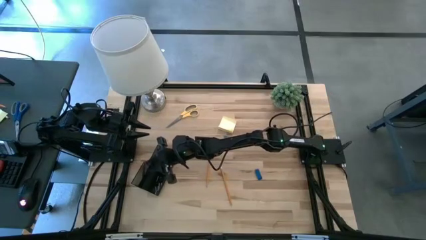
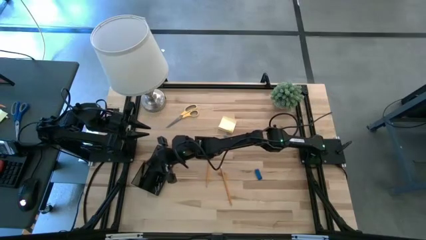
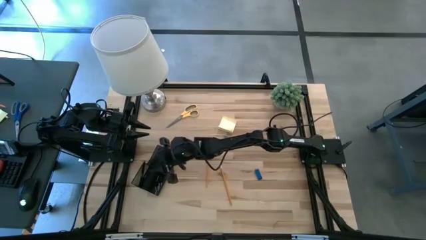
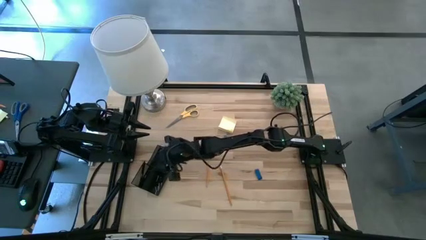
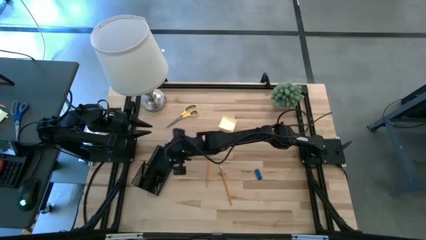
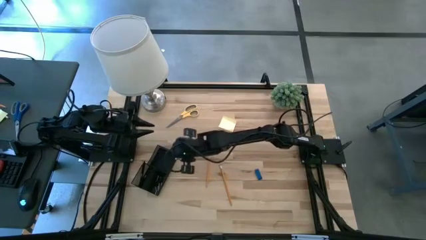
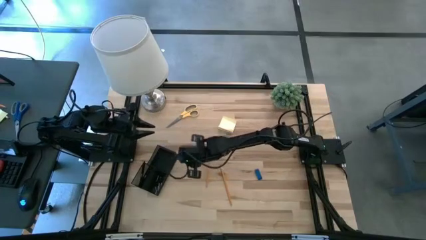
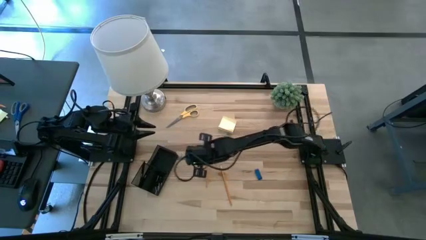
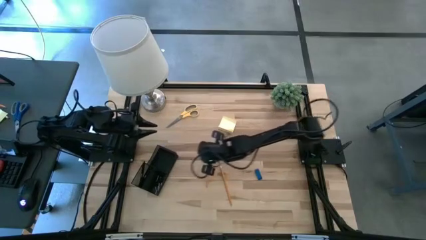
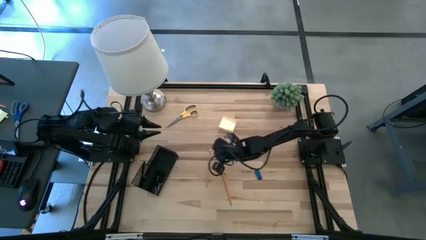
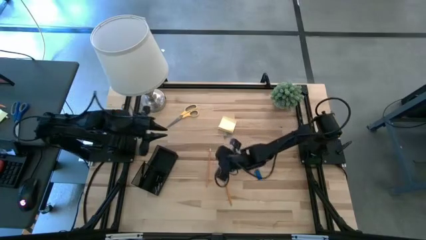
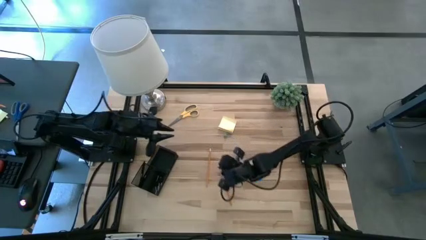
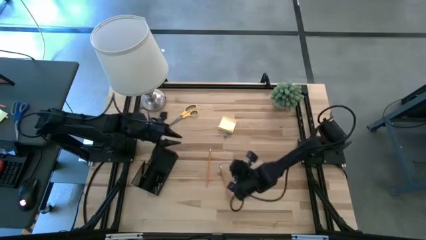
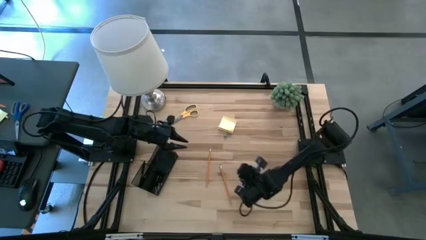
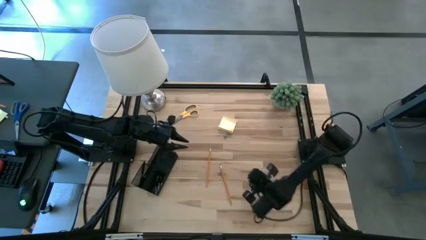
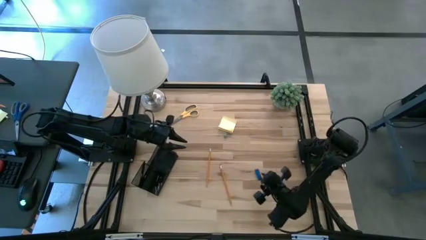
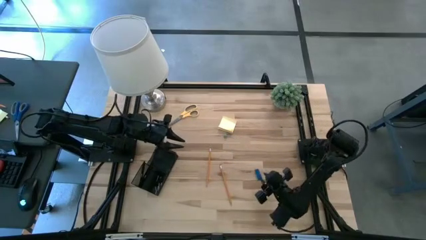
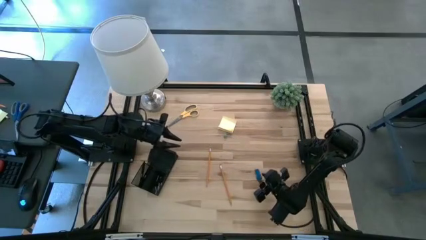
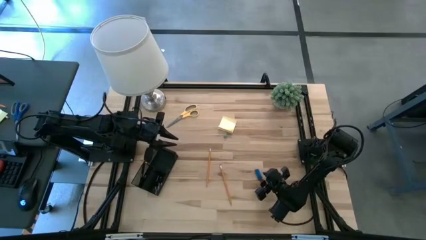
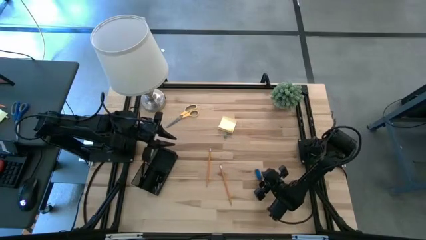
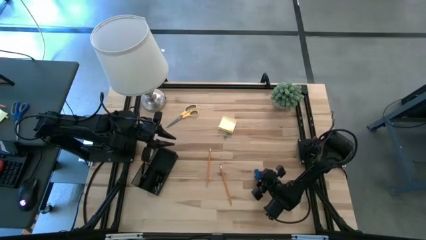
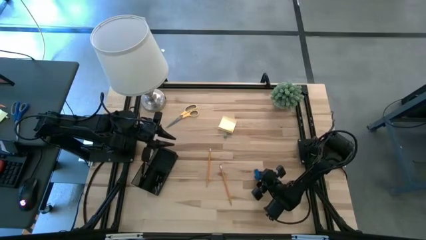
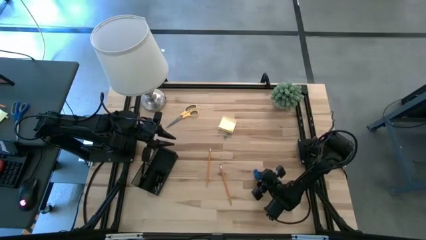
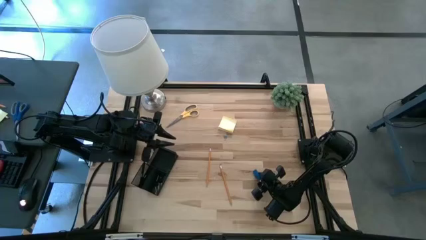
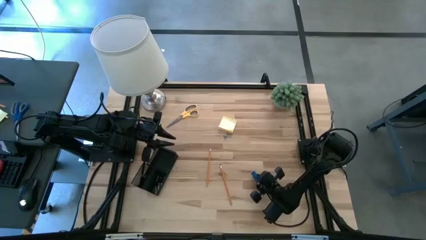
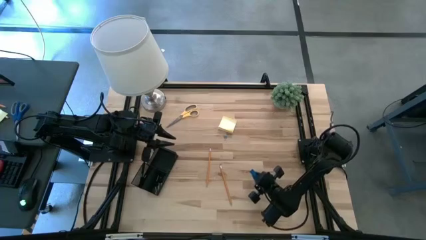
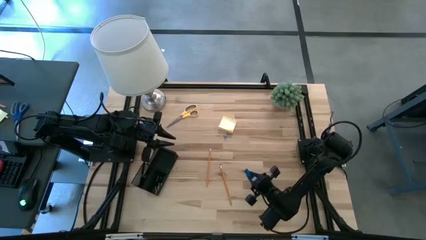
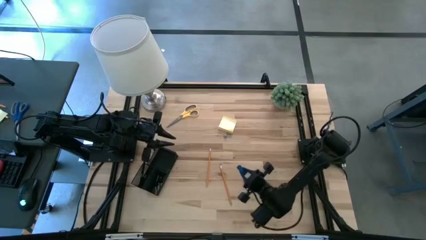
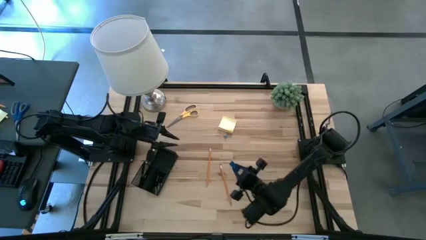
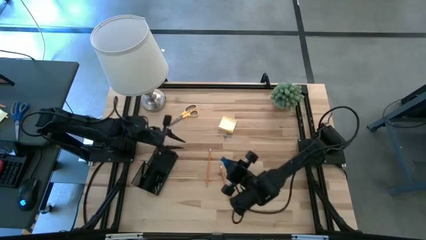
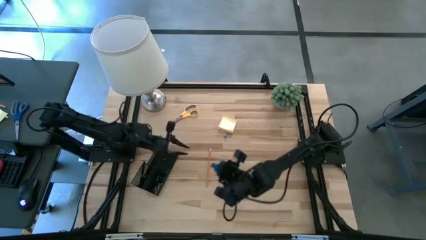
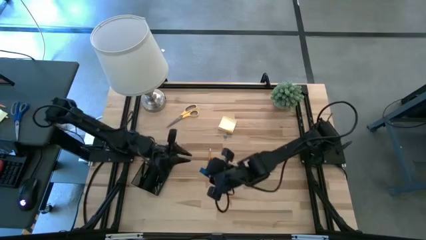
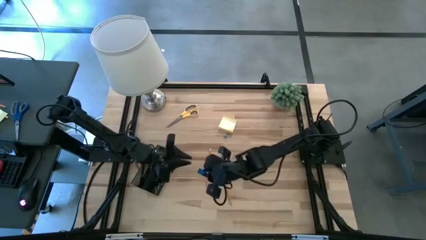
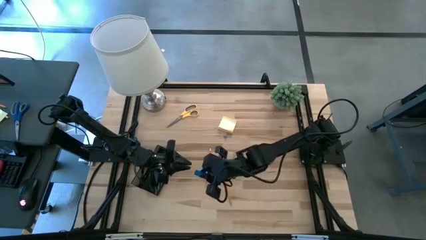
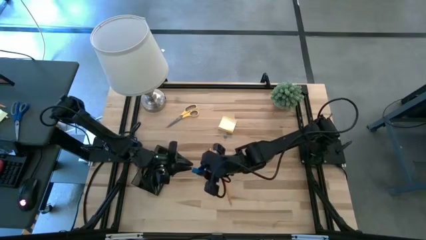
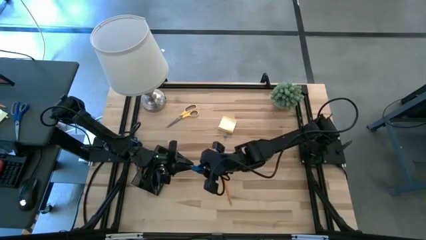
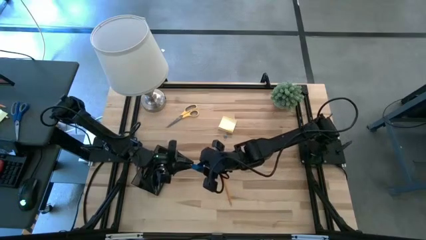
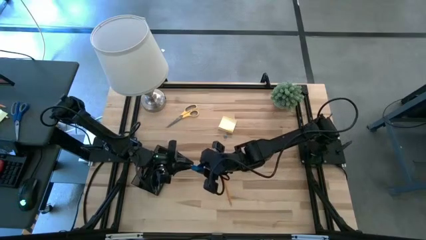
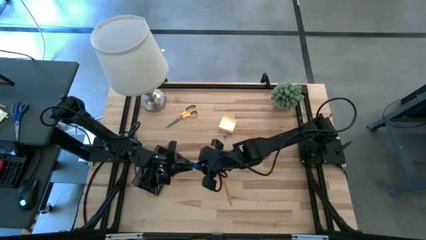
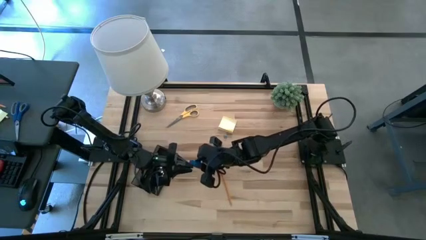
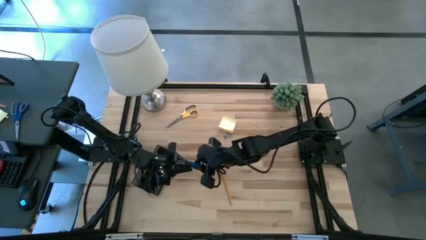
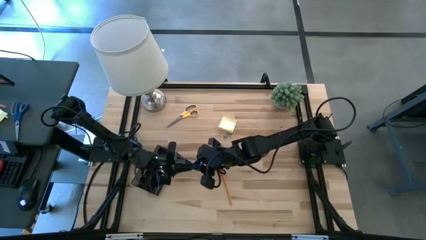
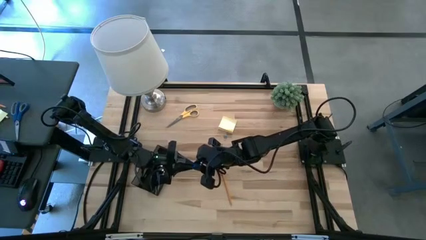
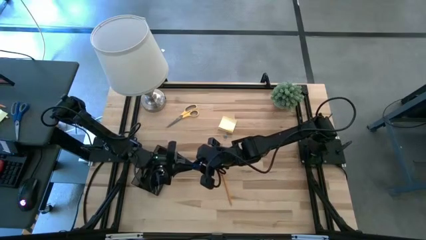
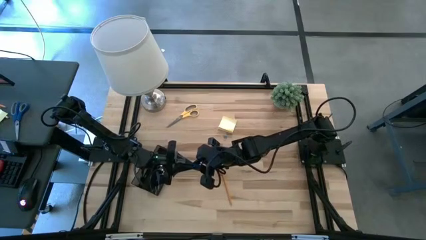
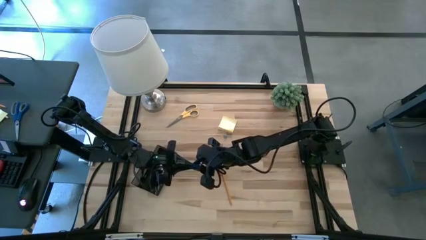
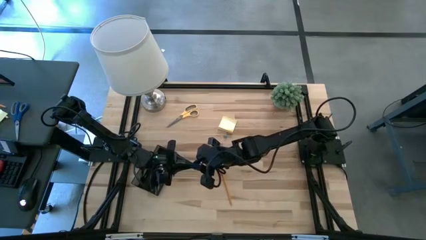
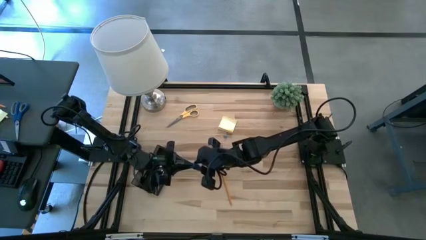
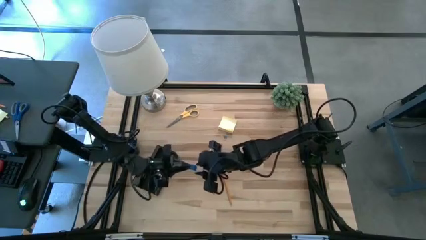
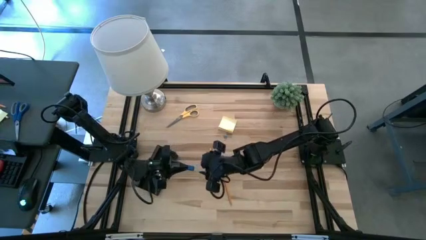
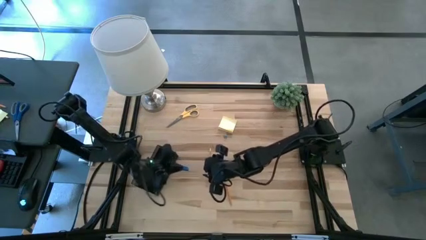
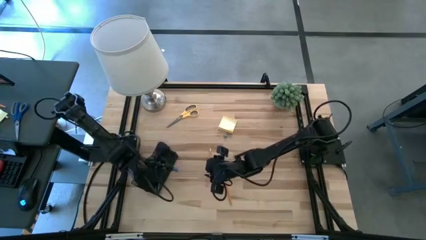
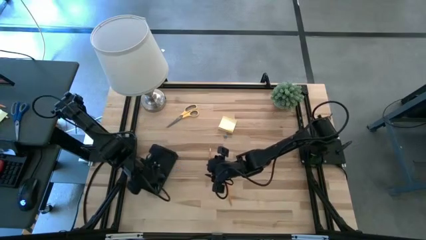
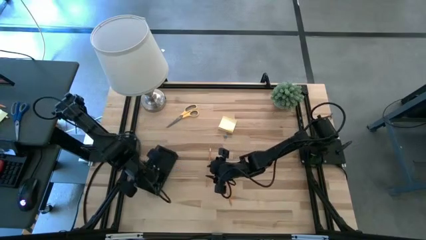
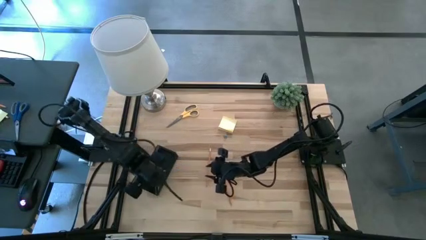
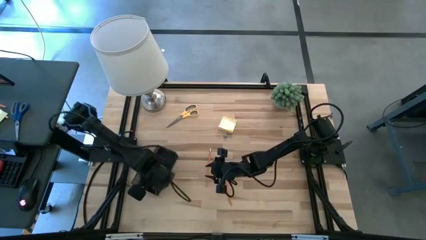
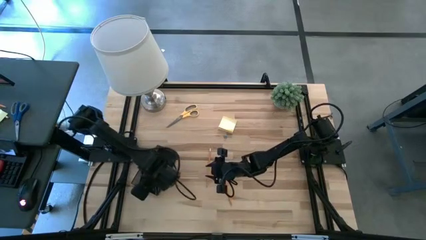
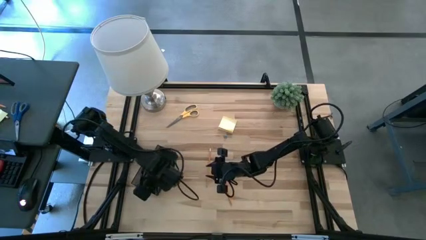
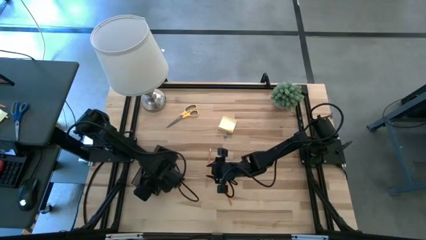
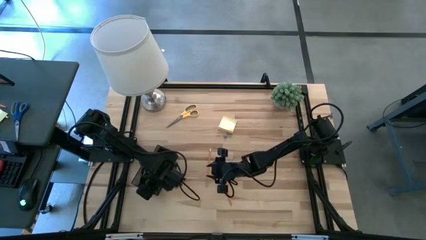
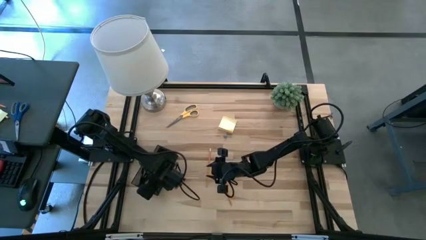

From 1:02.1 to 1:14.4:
Task: Pick and place office supplies into organizer
Put the blue eraser into the black desk organizer

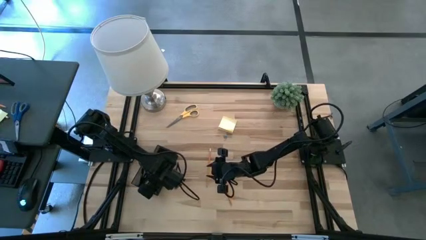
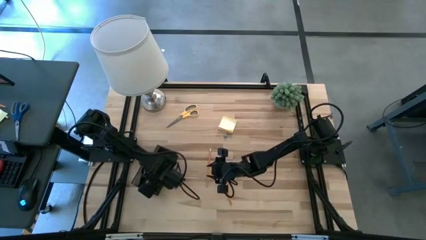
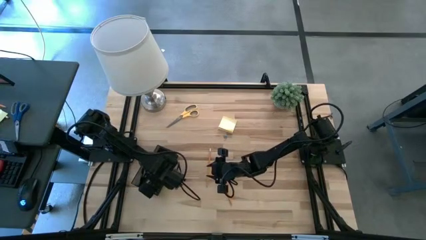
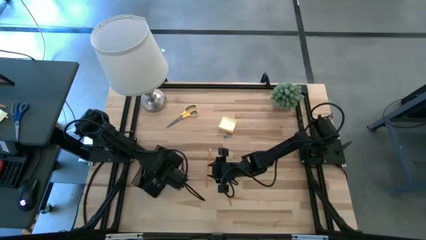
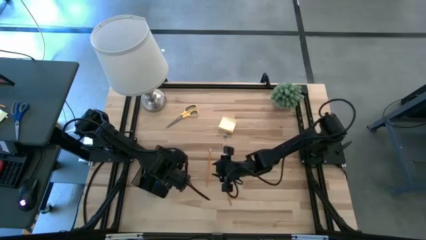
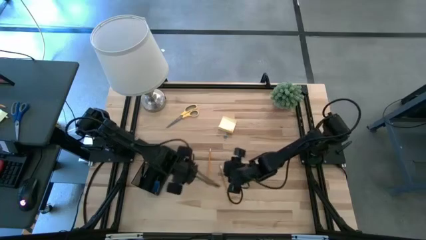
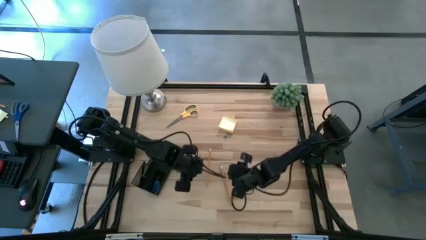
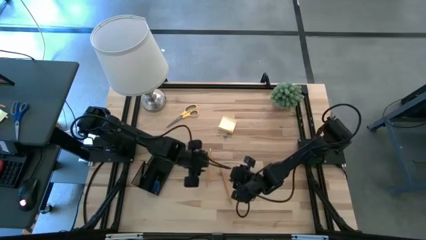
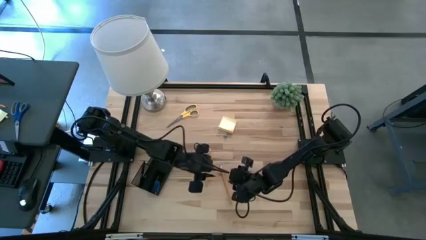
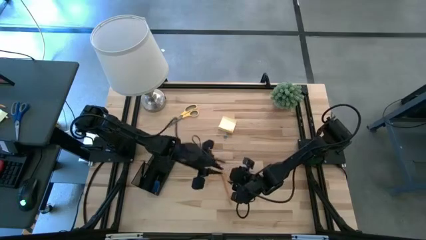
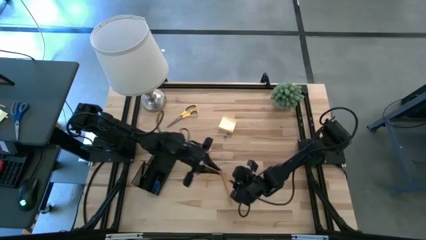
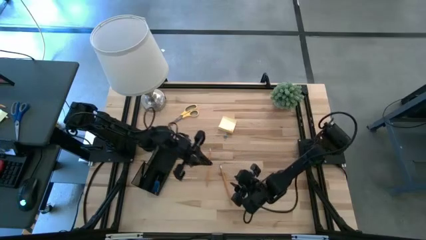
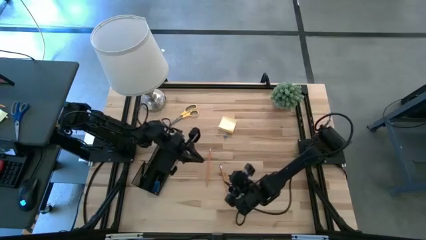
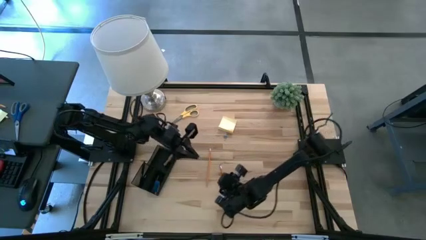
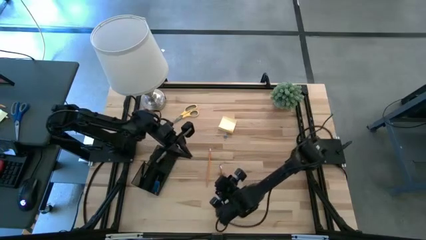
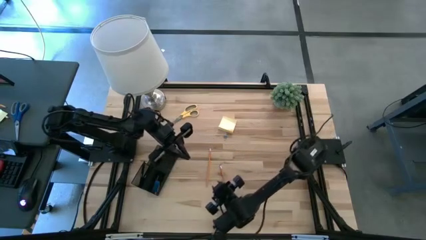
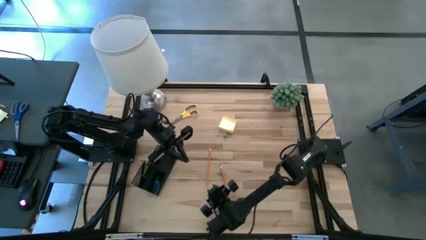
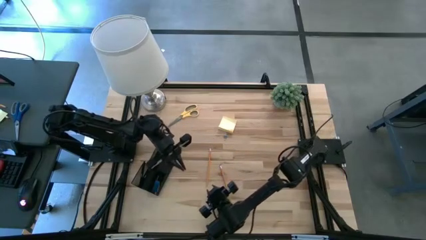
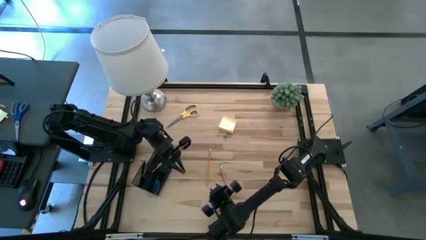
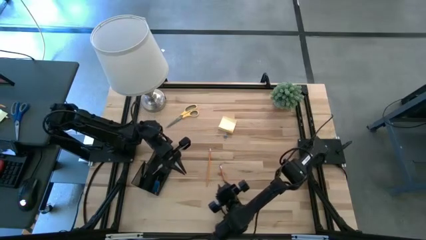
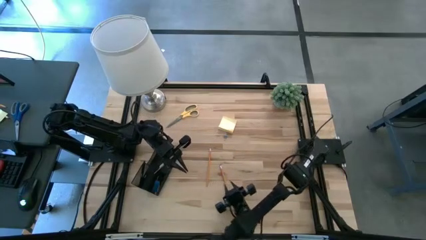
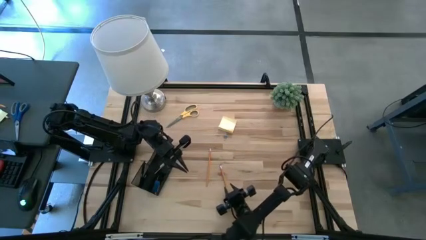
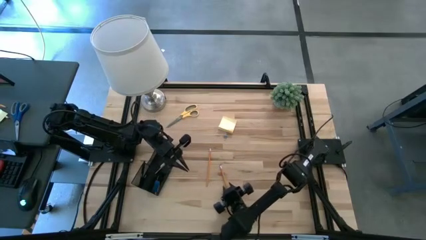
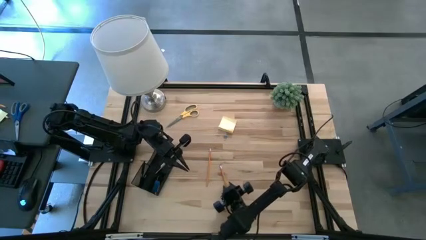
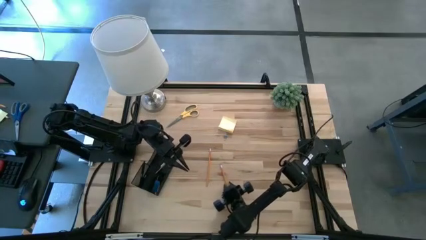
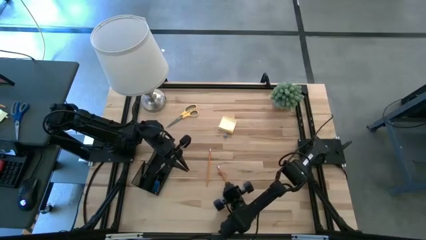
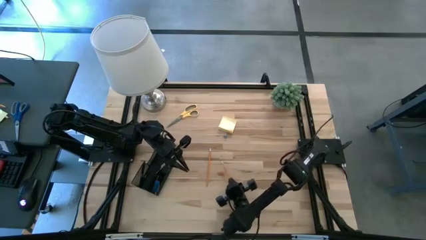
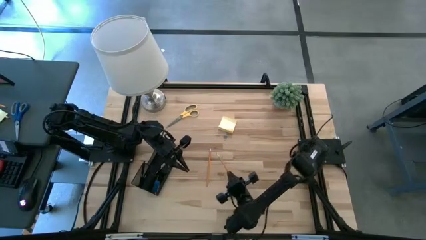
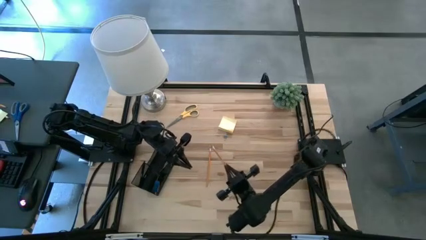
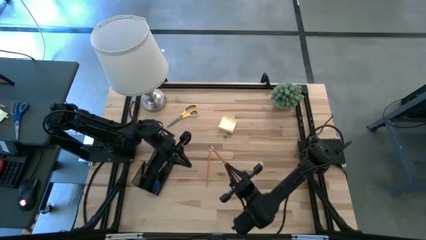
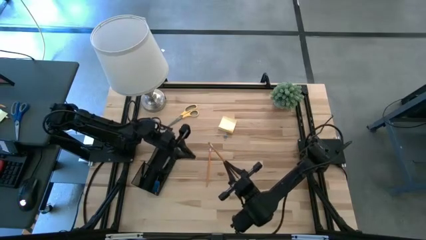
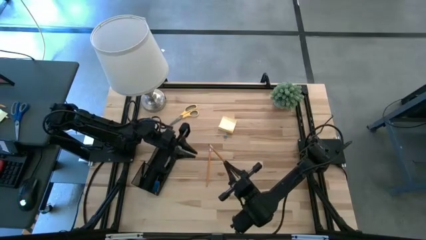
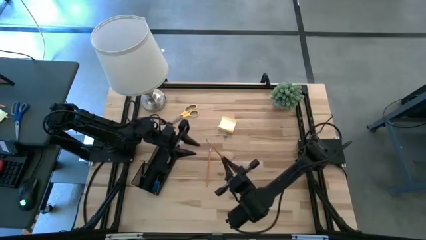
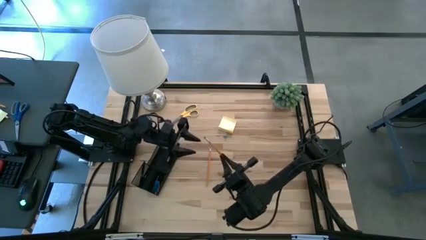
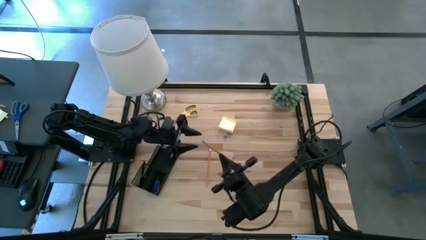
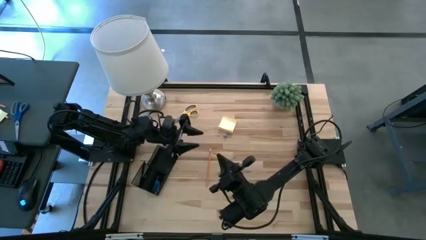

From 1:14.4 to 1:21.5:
Put the right yellow pencil into the black desk organizer
